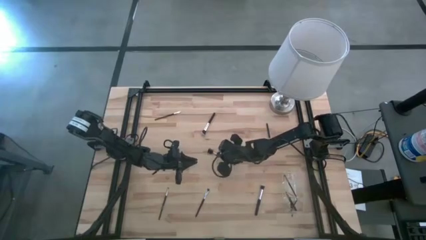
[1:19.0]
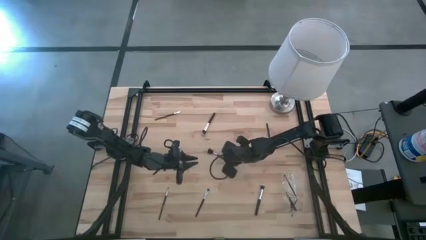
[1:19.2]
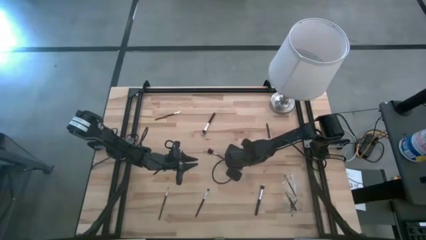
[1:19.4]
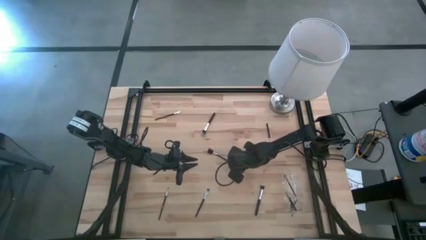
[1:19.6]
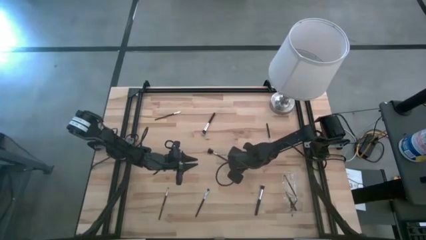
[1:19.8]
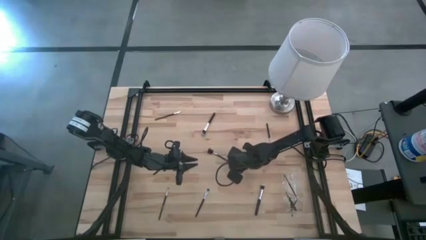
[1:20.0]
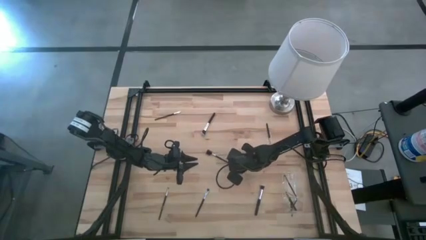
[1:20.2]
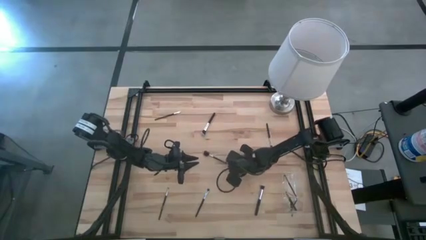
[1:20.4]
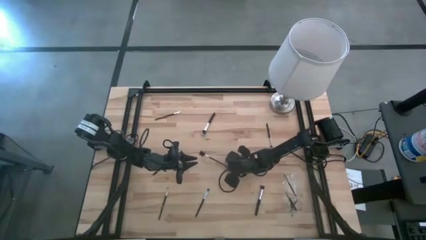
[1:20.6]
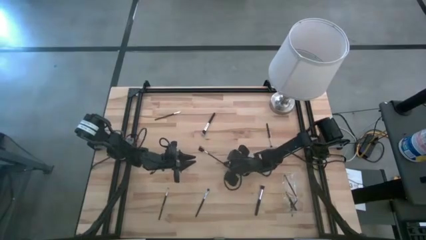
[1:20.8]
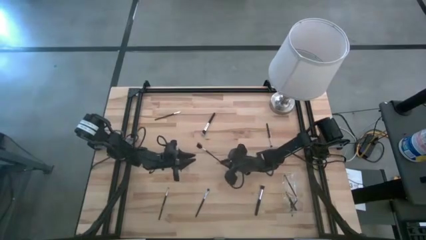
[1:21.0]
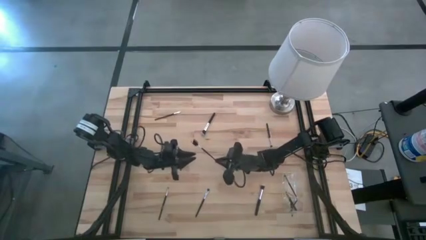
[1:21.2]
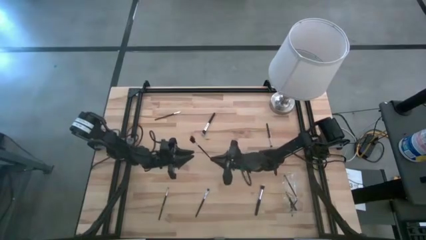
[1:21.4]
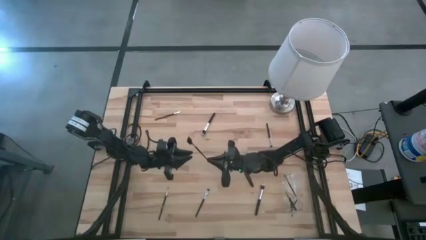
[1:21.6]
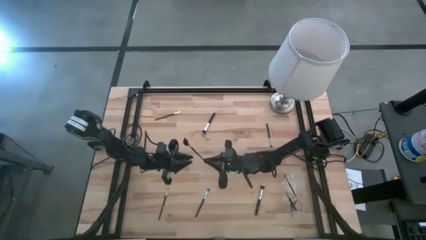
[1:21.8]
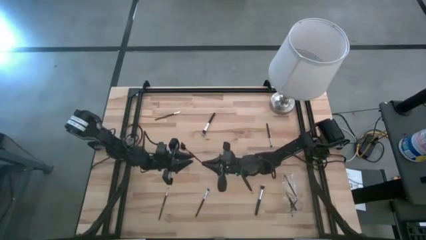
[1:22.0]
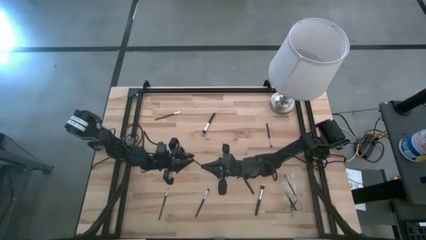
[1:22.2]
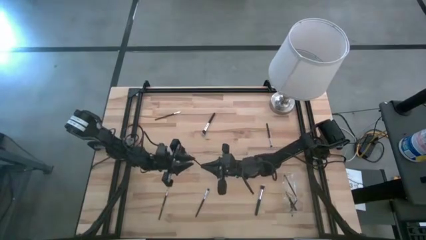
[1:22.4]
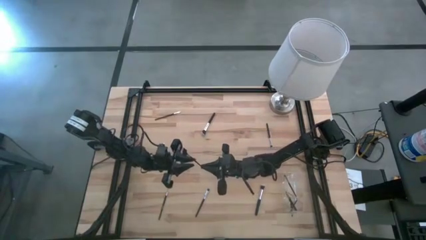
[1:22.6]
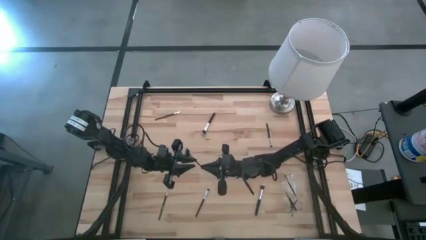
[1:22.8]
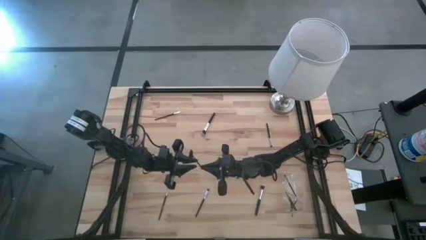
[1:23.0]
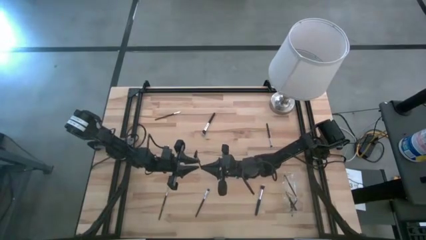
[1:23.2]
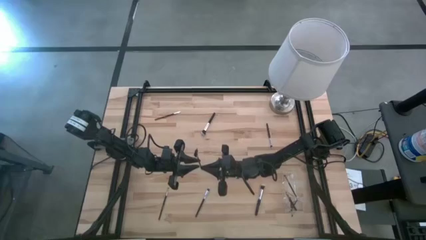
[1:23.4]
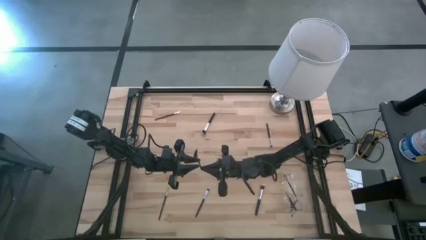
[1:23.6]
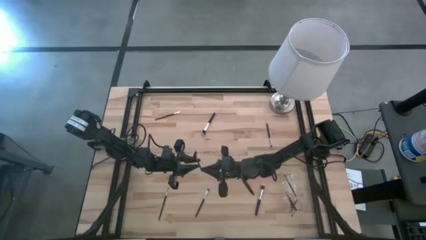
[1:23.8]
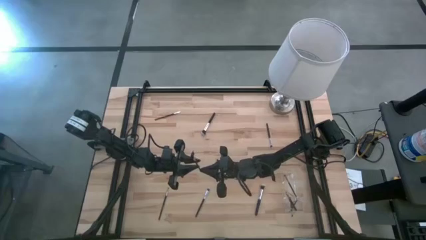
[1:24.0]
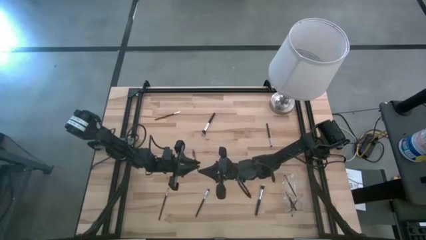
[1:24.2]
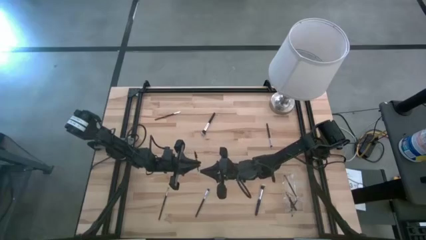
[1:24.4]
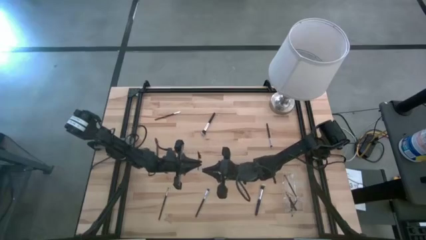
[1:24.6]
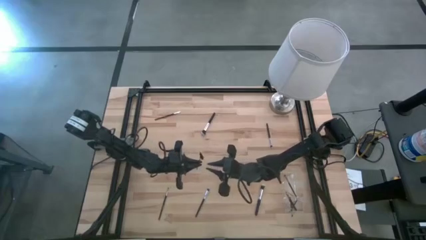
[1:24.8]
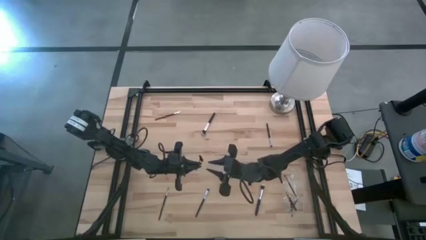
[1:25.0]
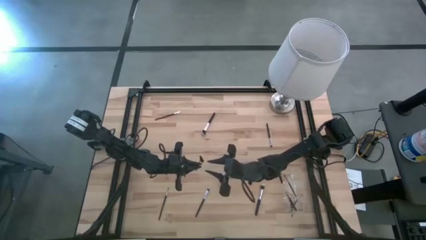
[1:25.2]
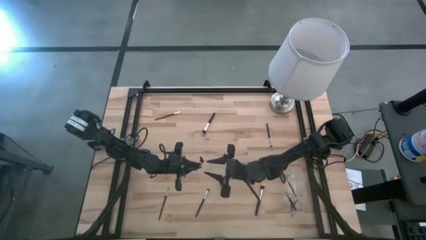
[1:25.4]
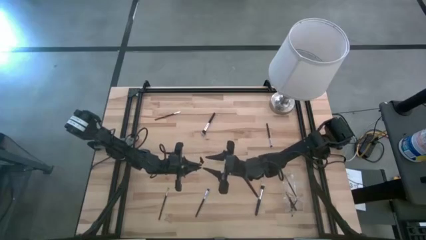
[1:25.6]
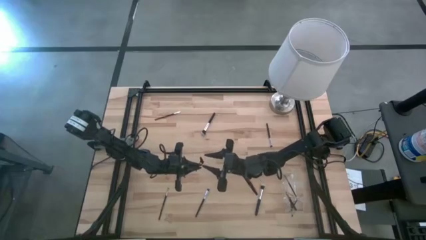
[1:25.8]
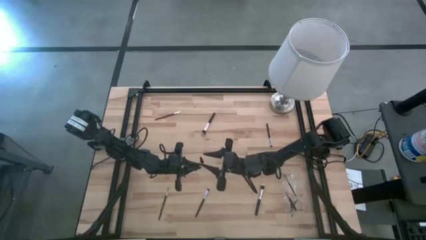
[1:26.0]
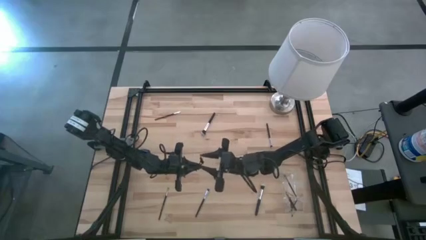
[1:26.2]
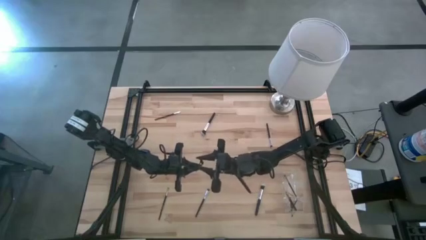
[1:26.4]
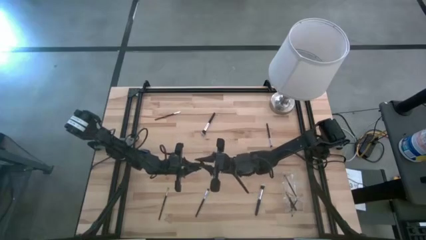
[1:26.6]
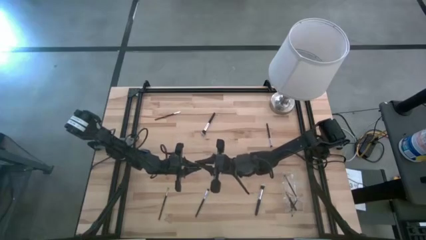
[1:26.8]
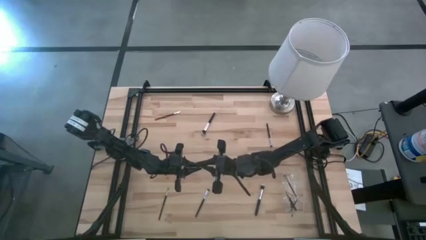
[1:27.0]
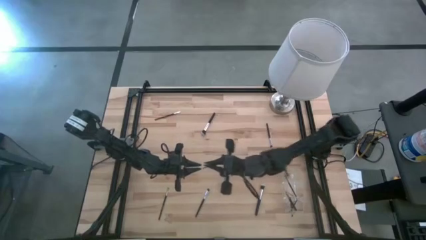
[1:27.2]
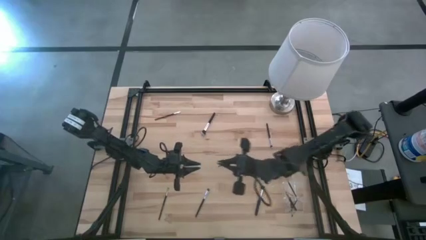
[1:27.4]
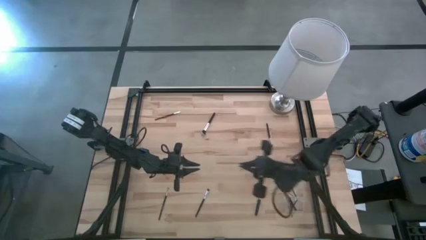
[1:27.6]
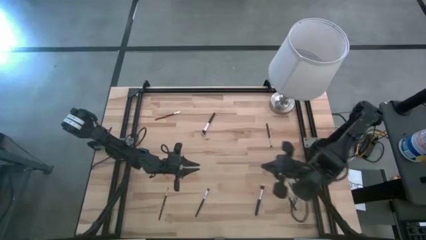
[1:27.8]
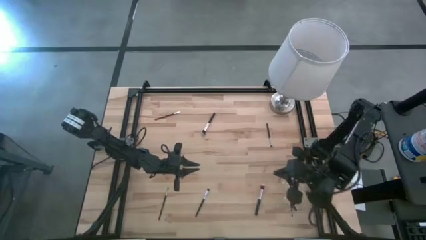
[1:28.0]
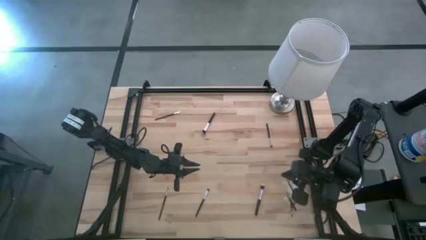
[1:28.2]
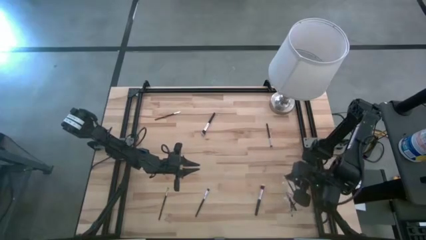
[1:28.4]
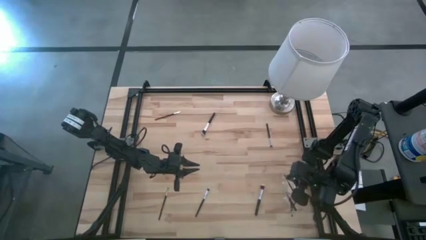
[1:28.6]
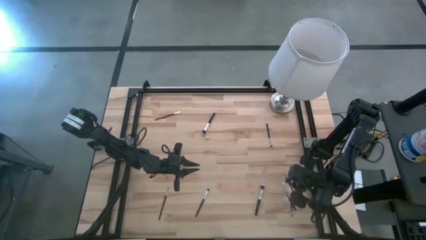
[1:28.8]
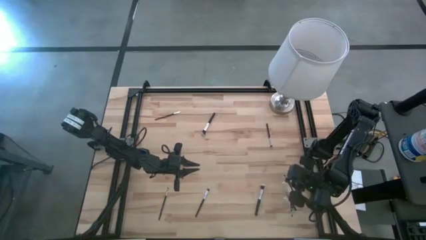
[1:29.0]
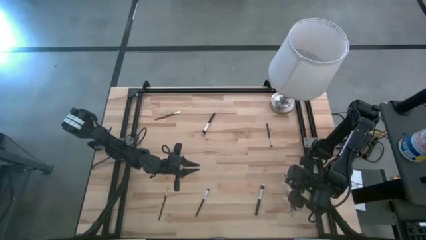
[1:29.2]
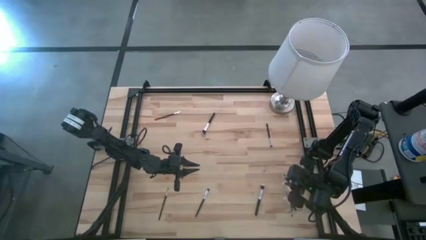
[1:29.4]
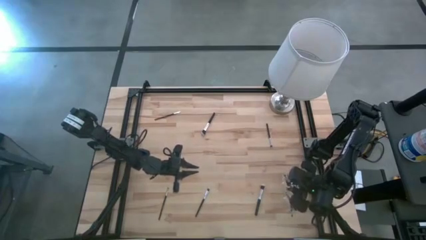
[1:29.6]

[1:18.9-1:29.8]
Task: Put items in baskets/containers
Put the eye groomer brush into the transparent organizer

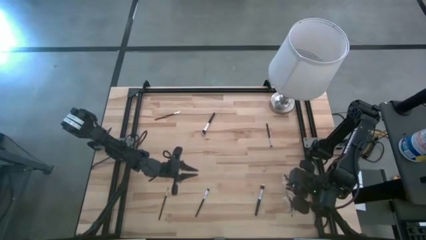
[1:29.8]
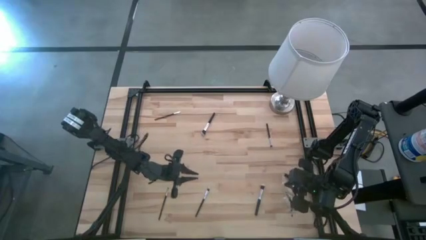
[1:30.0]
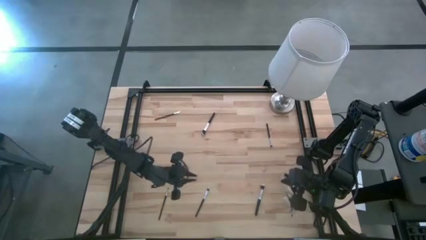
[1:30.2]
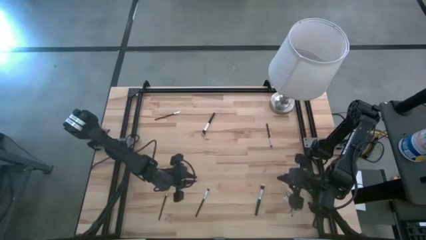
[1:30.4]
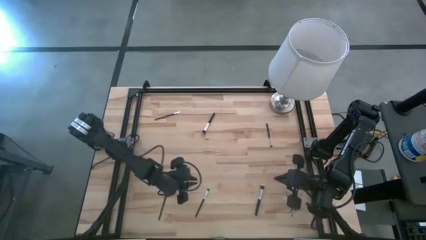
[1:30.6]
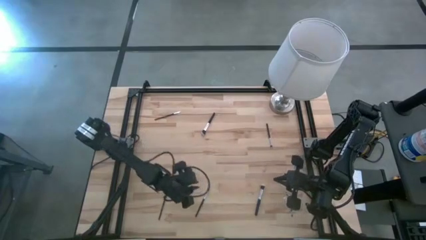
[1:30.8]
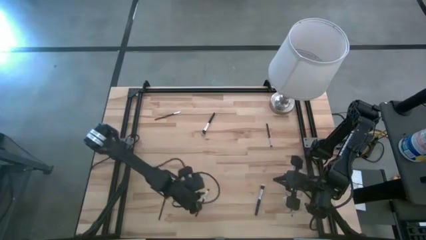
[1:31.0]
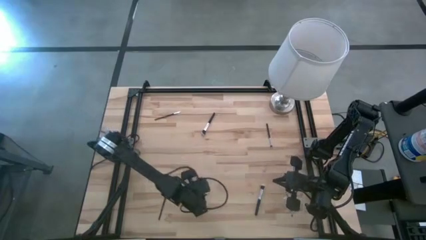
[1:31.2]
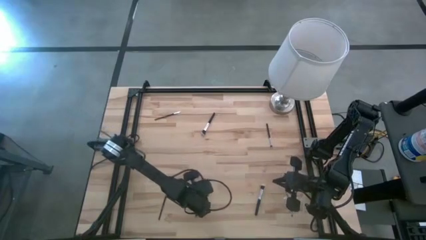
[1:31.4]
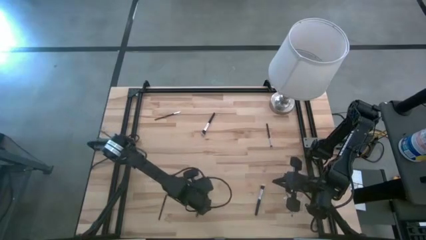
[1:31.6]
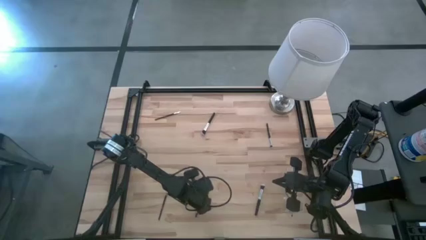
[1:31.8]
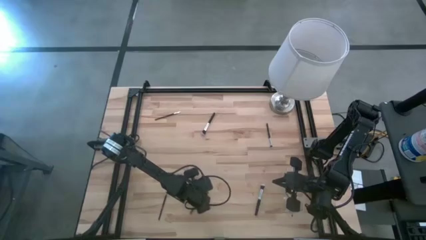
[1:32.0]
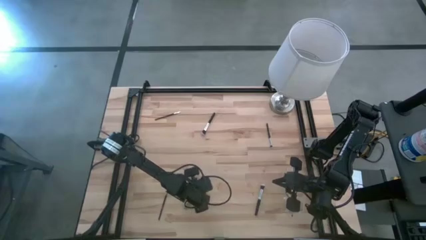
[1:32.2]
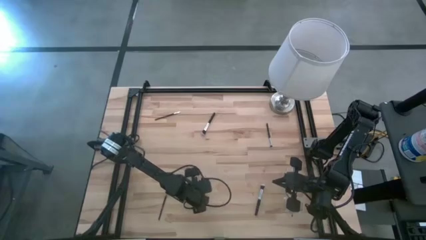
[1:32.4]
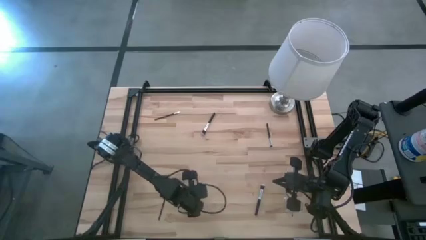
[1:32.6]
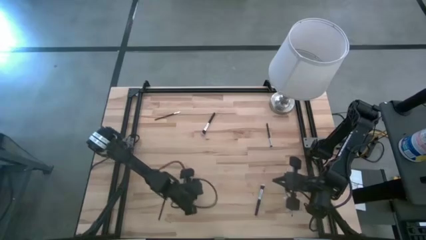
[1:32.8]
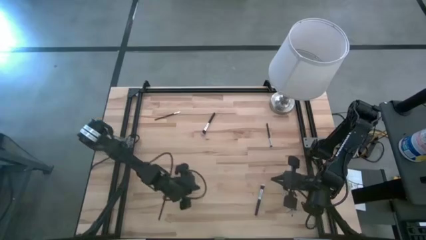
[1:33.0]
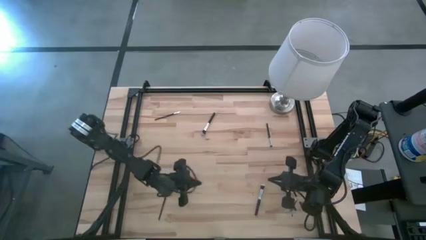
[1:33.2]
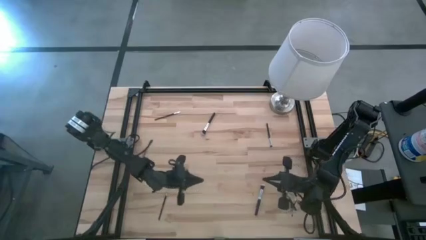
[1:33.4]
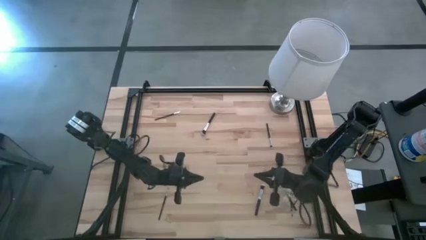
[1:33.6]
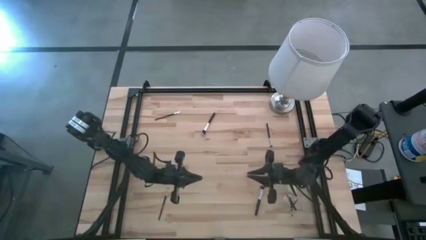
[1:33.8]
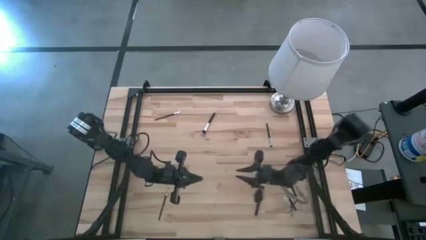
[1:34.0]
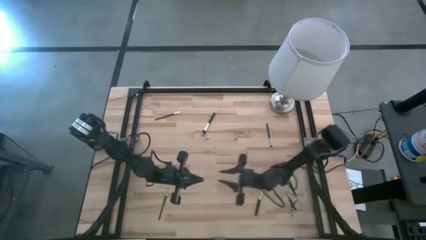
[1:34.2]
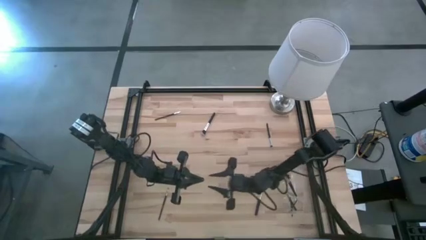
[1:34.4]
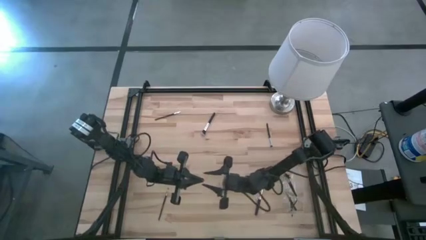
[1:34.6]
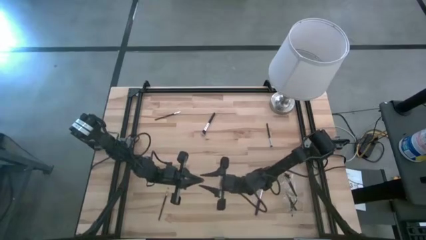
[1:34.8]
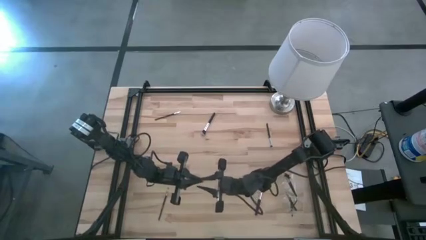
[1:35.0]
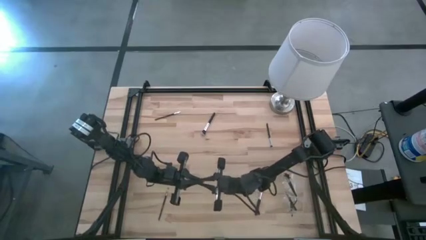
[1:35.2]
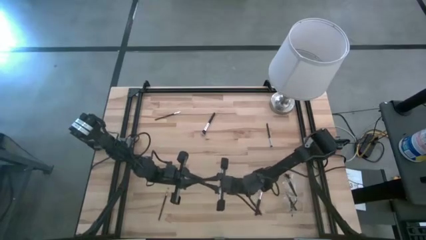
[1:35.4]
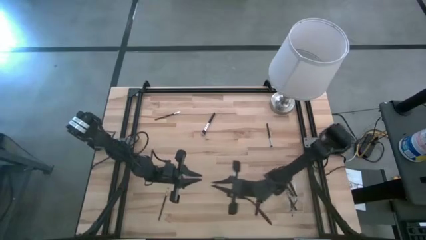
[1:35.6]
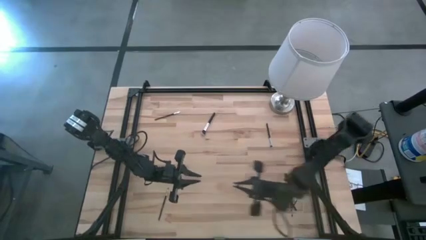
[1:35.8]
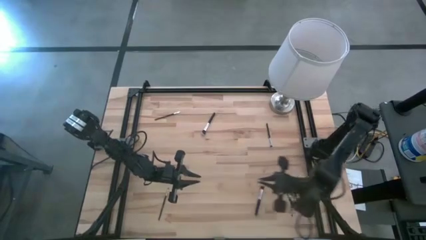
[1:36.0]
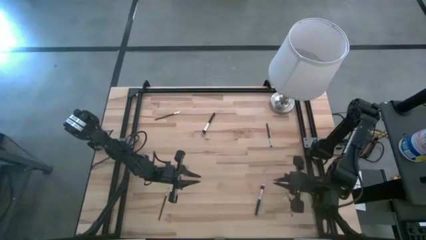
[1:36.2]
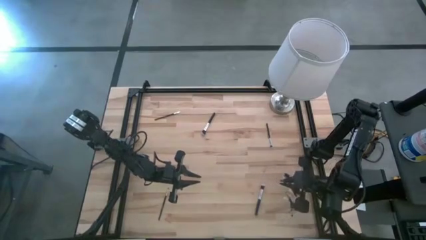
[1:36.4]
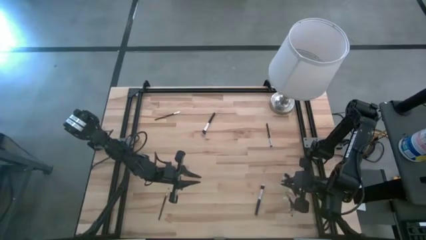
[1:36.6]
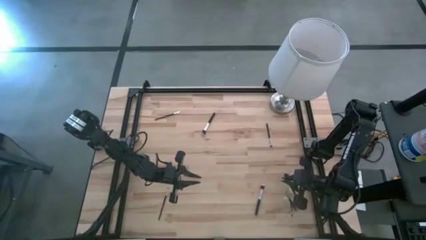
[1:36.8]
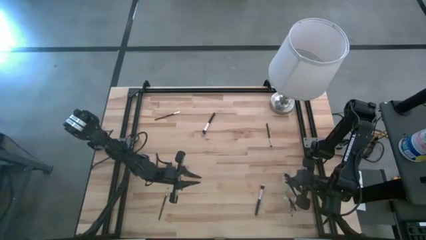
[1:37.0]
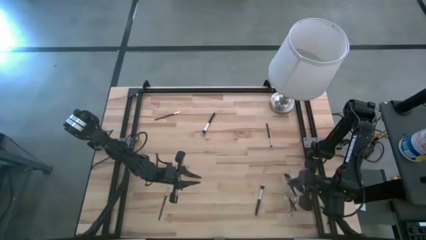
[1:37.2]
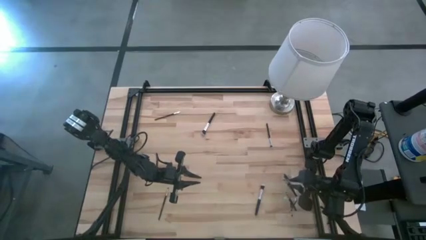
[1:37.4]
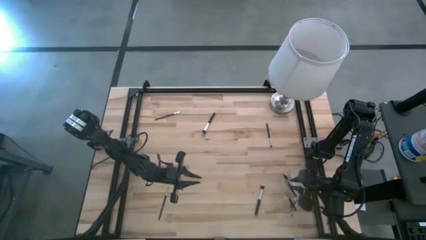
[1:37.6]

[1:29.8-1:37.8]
Put the eyeshadow brush into the transparent organizer
